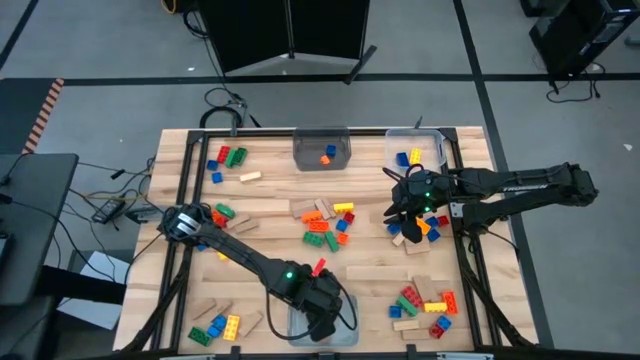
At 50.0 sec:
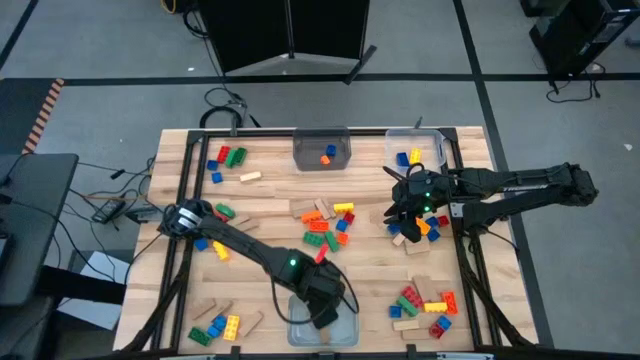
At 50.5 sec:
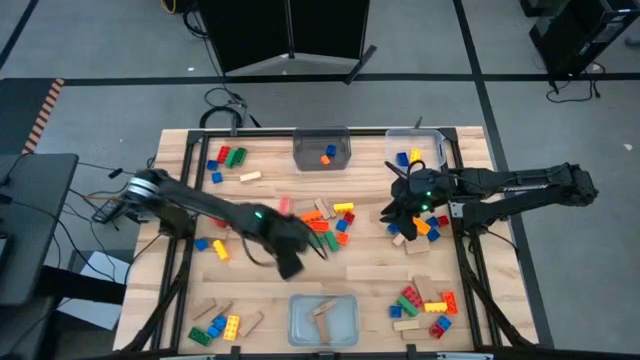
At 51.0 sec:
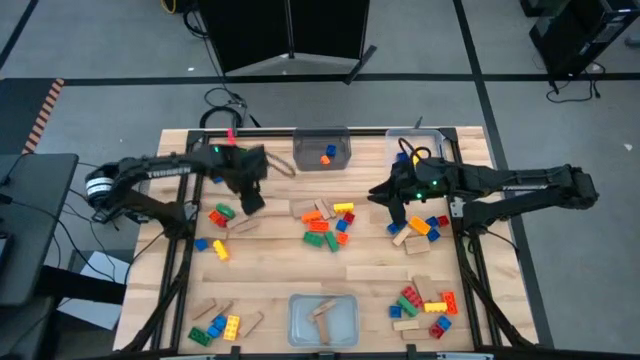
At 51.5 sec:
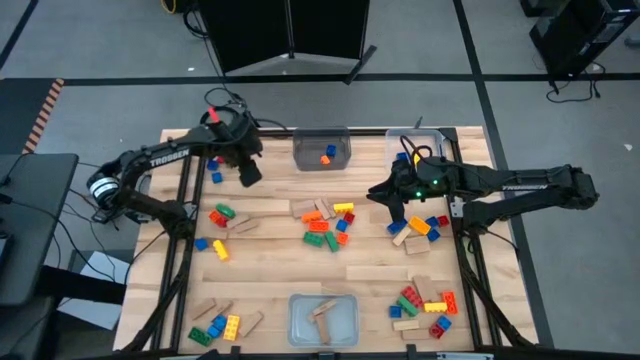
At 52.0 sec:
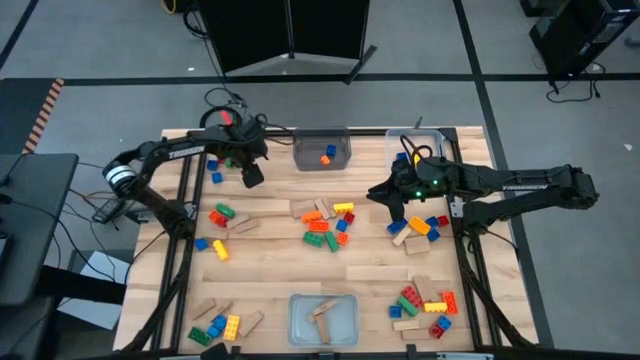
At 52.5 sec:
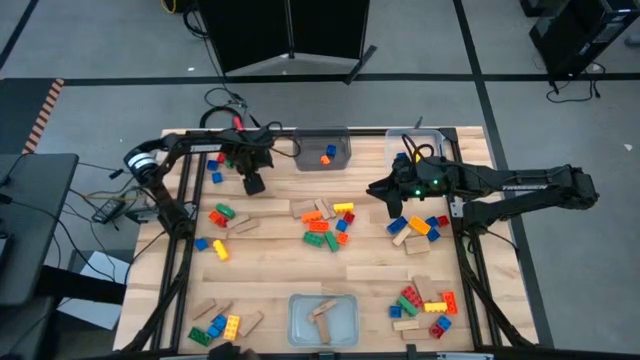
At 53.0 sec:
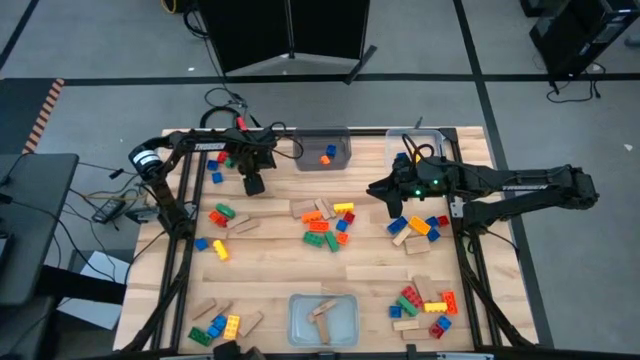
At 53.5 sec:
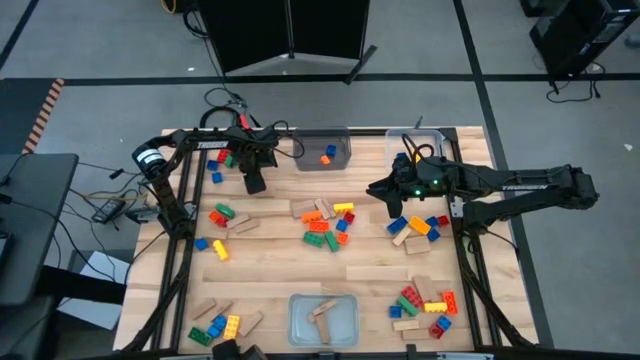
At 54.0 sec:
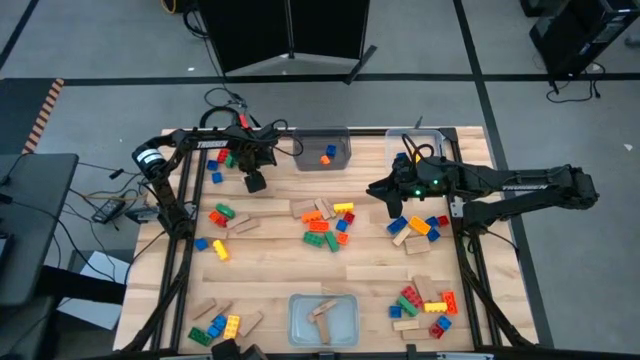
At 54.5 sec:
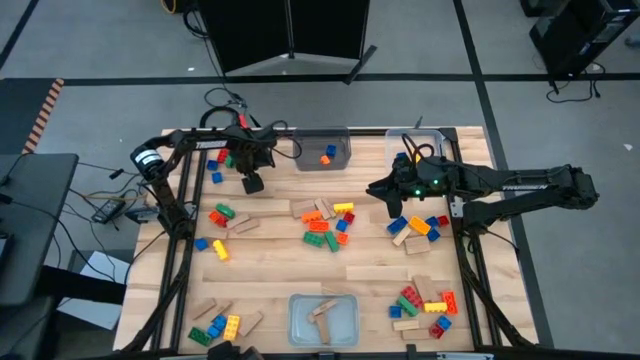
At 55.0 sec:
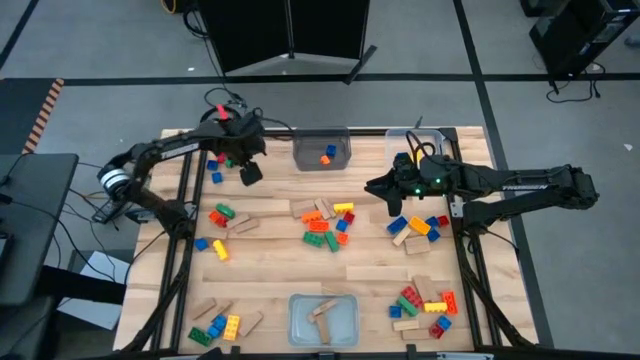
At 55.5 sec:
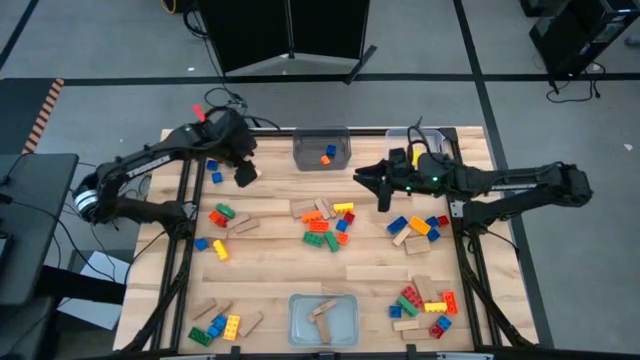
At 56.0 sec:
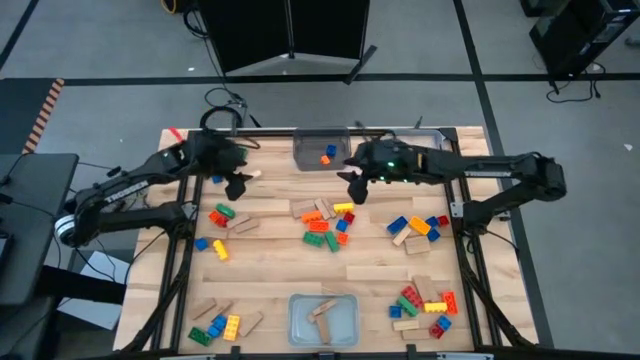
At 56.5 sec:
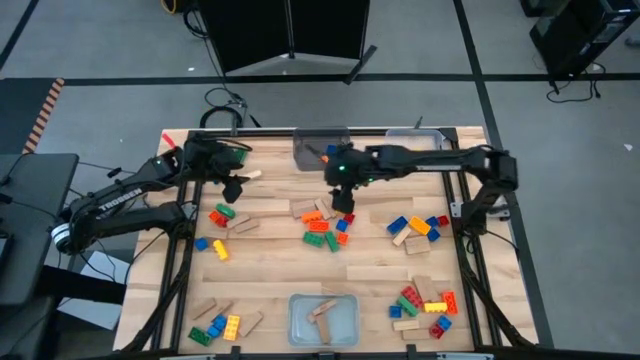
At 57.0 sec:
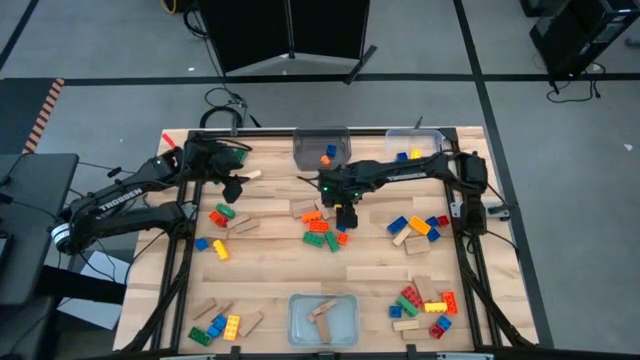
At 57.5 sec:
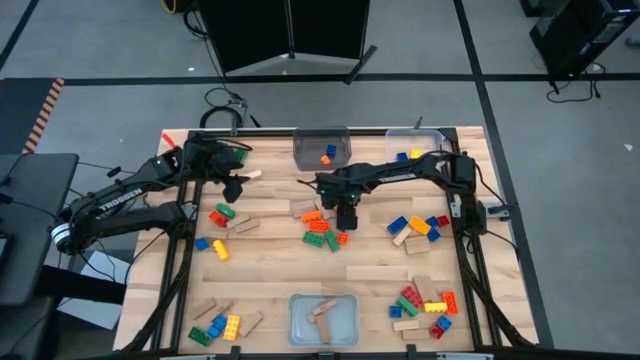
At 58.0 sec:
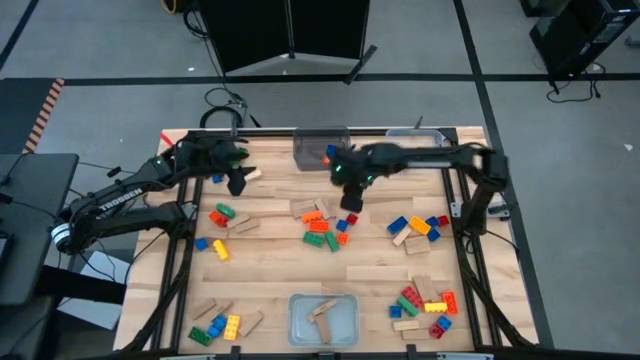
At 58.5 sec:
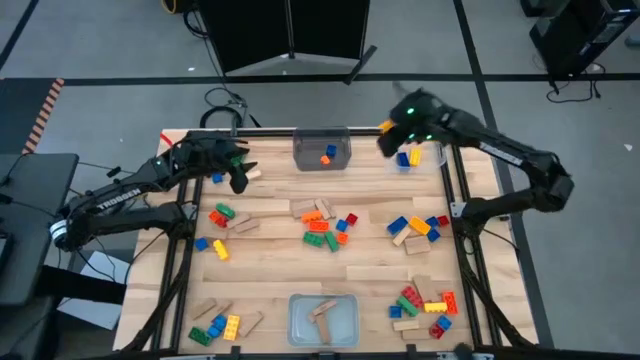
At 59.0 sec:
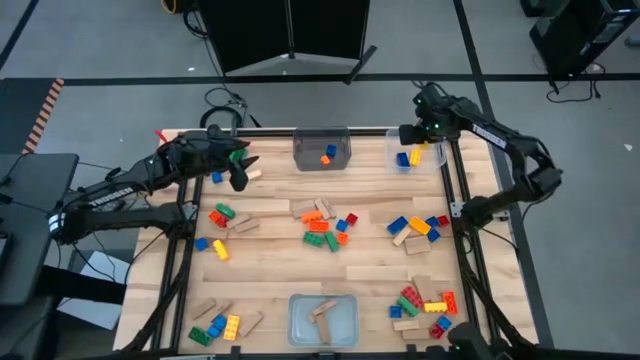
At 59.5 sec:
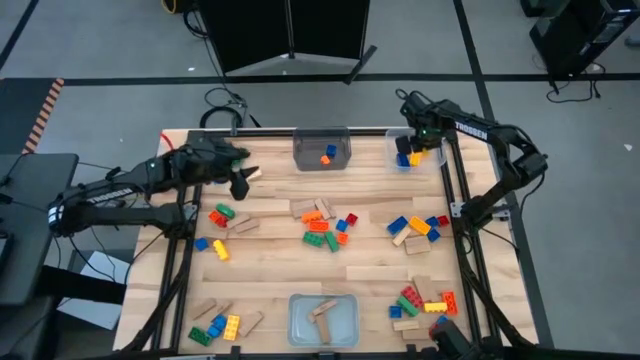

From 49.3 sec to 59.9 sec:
Task: Sort blocks by size
Put the large yellow game piece into the transparent bin

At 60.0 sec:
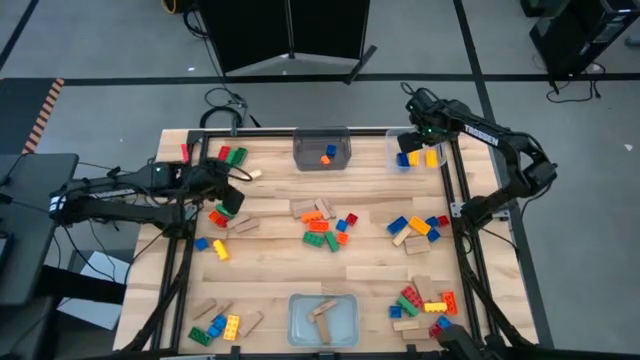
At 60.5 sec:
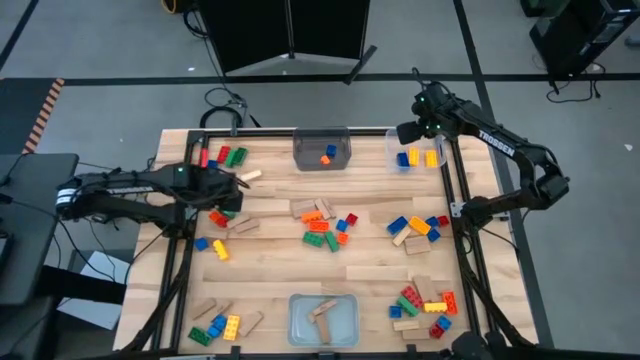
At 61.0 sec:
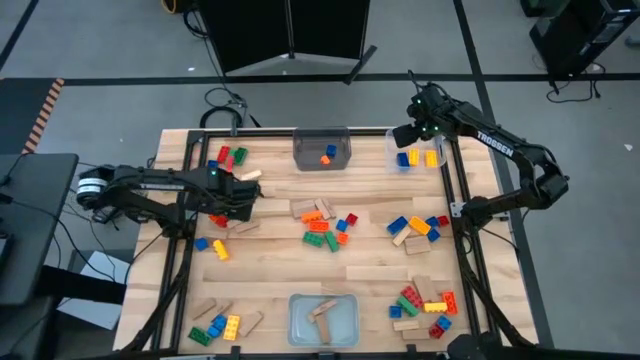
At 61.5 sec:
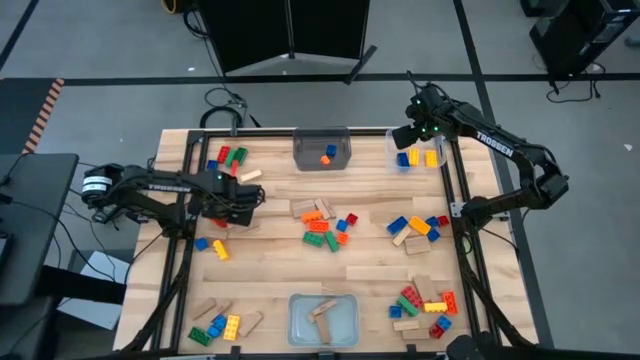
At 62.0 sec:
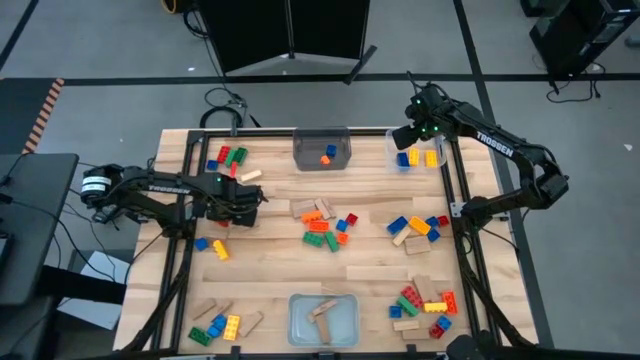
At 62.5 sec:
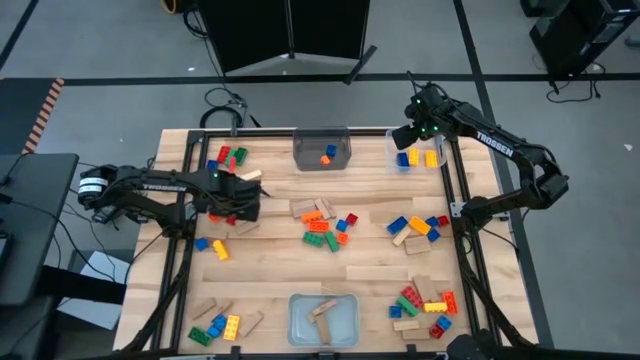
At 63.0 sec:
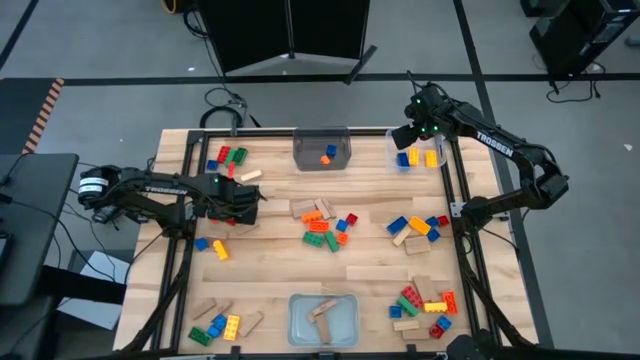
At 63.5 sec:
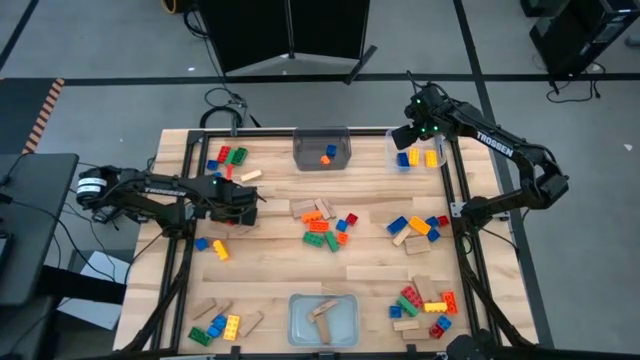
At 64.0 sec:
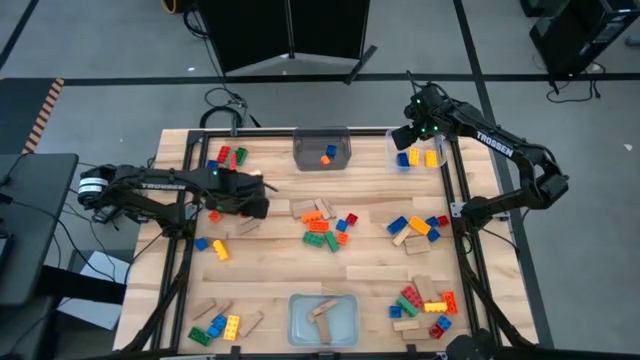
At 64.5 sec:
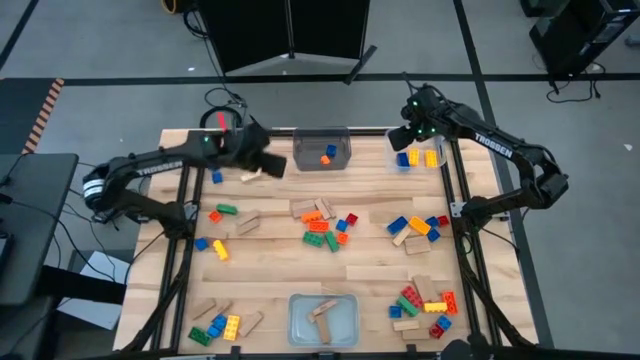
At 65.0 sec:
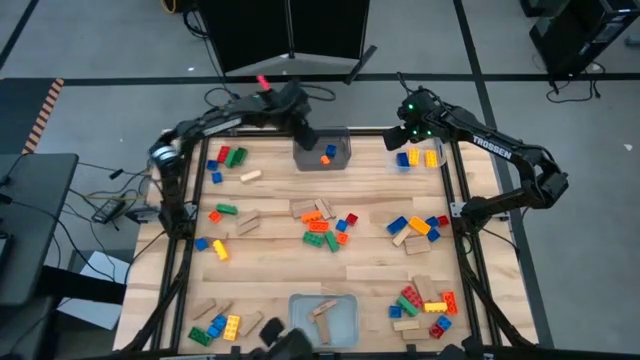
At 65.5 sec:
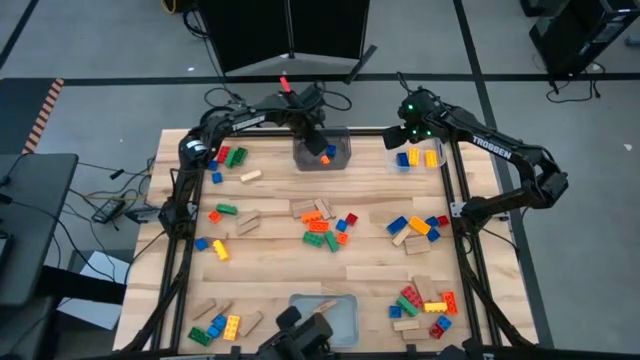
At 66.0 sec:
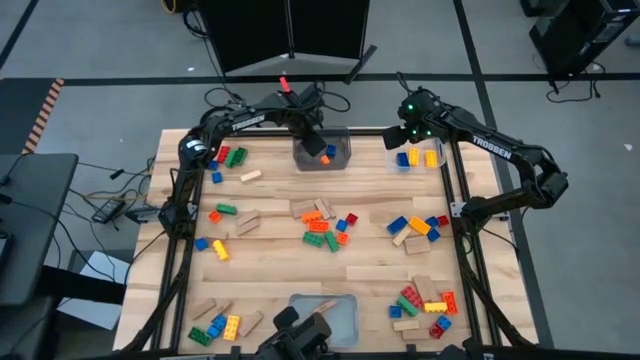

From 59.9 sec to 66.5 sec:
Put the small red game piece into the black bin

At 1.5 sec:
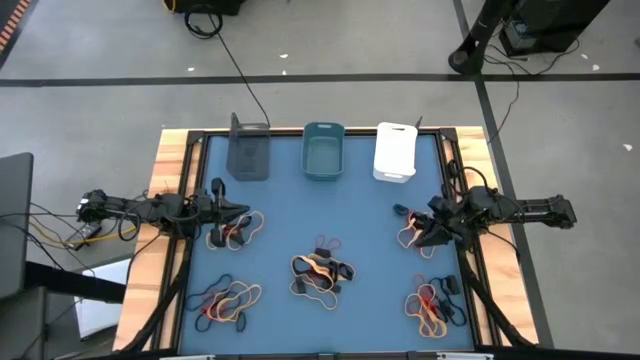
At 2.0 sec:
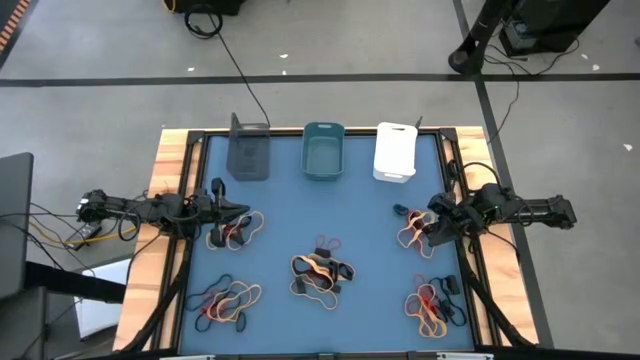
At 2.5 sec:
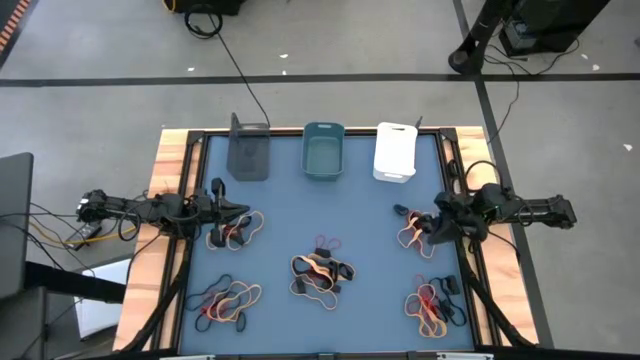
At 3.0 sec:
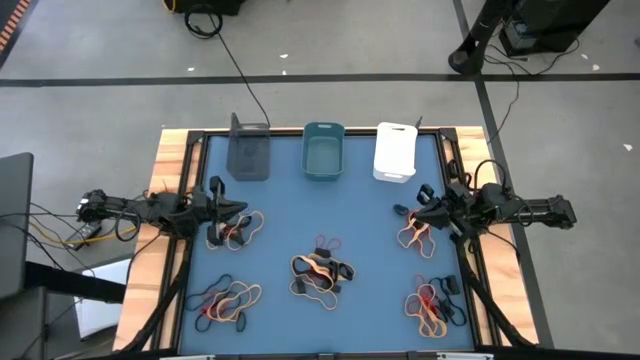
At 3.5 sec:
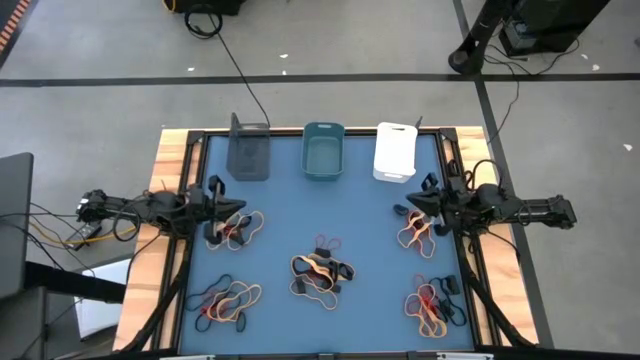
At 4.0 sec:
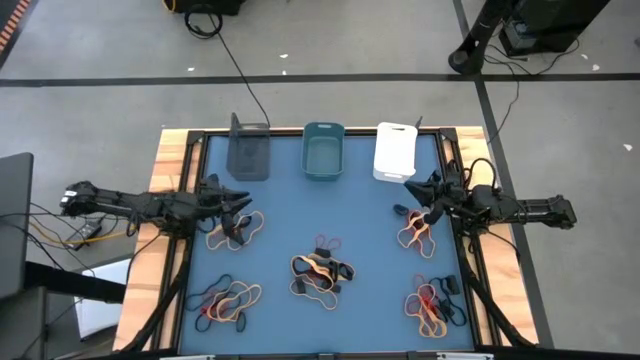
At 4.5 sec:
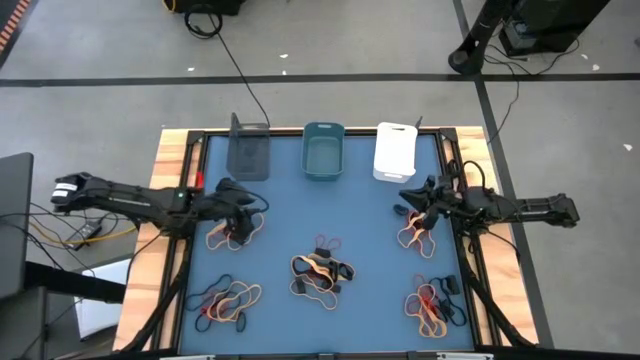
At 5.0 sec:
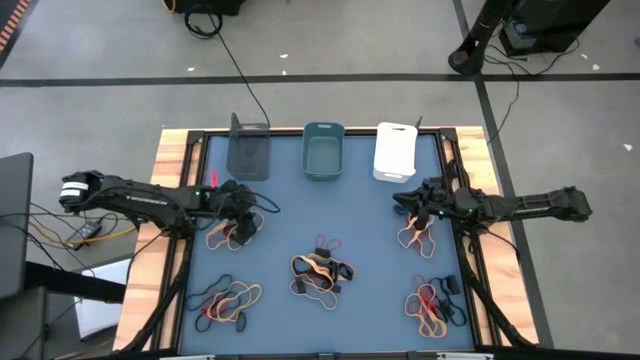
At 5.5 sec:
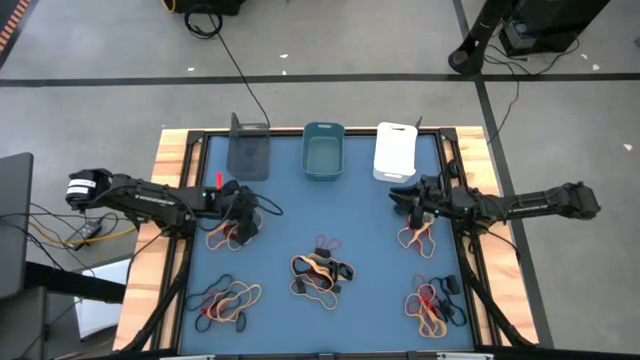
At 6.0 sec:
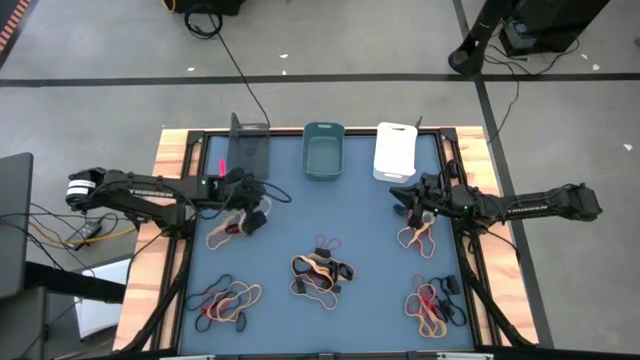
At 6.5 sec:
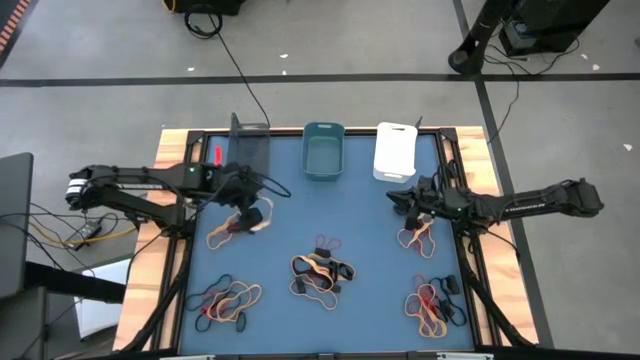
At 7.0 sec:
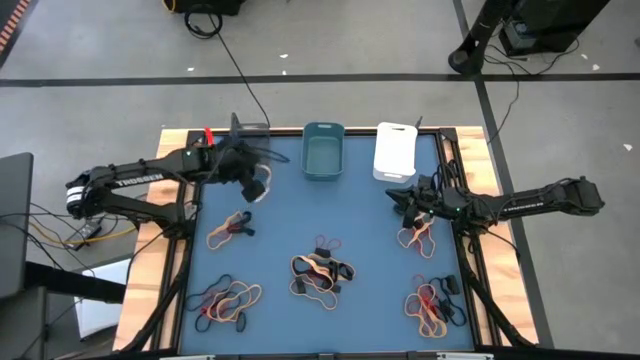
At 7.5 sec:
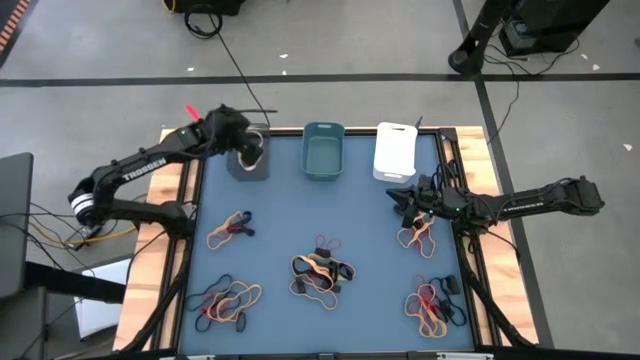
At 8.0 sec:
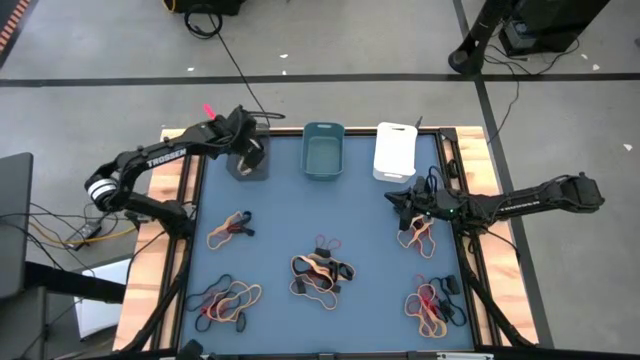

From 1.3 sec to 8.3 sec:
Task: Sort rubber bands into baskets
Put the yellow rubber band into the black bin
